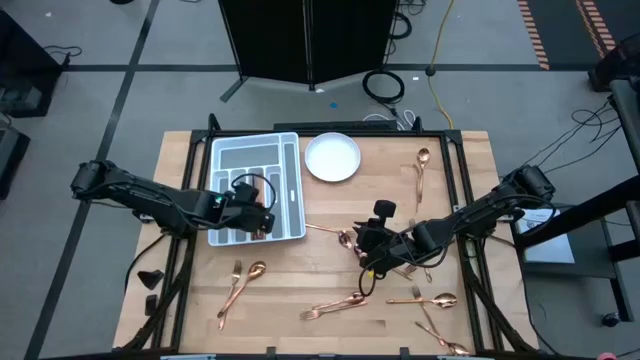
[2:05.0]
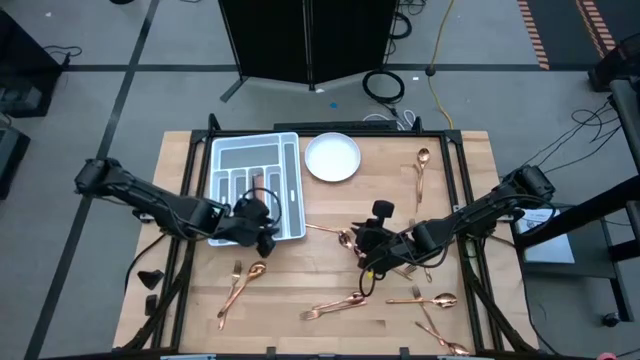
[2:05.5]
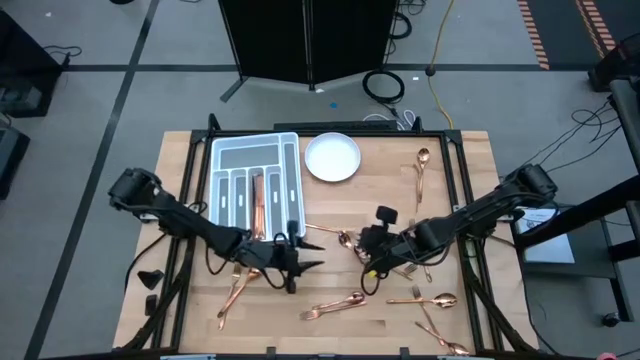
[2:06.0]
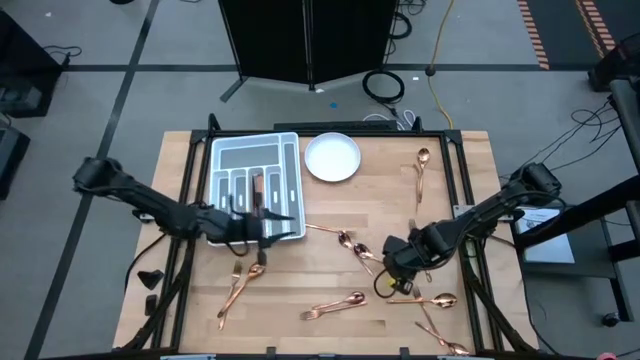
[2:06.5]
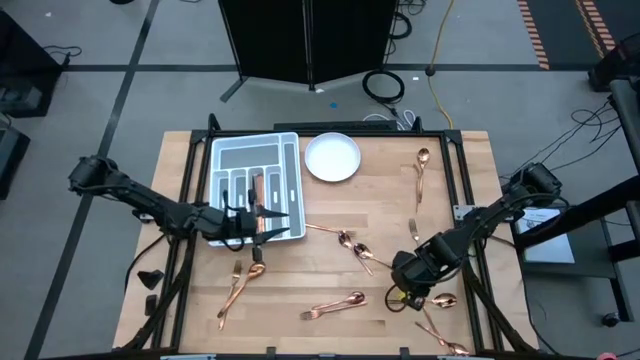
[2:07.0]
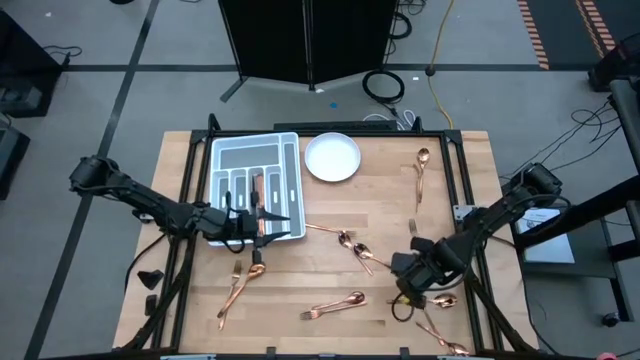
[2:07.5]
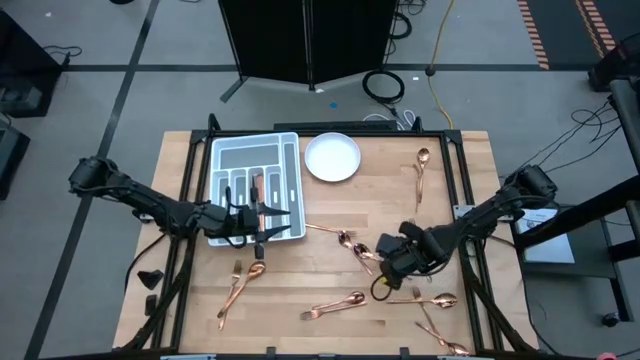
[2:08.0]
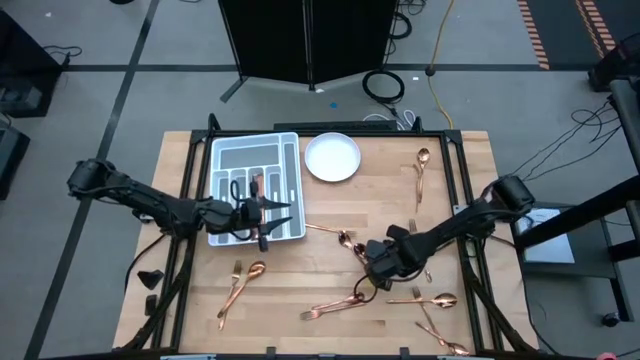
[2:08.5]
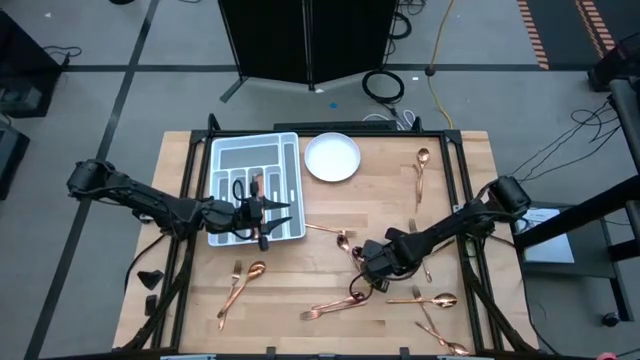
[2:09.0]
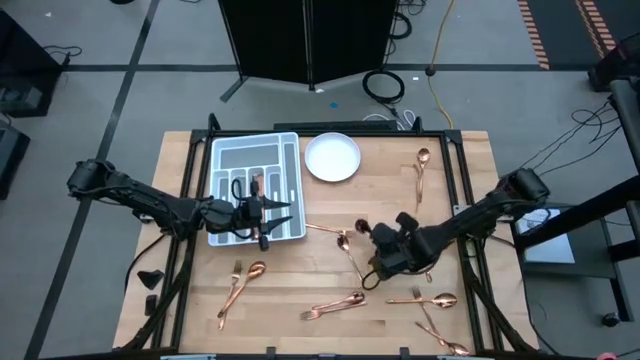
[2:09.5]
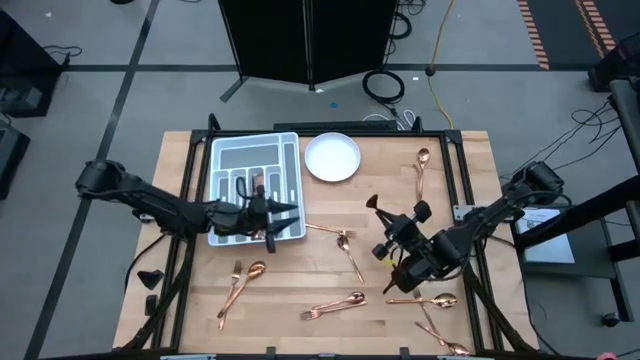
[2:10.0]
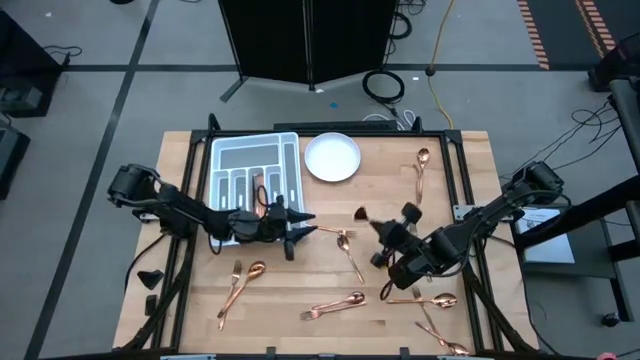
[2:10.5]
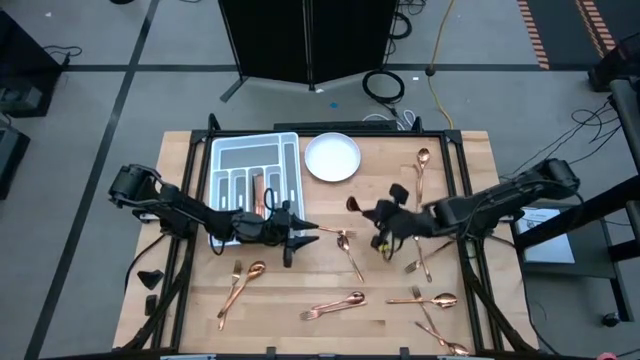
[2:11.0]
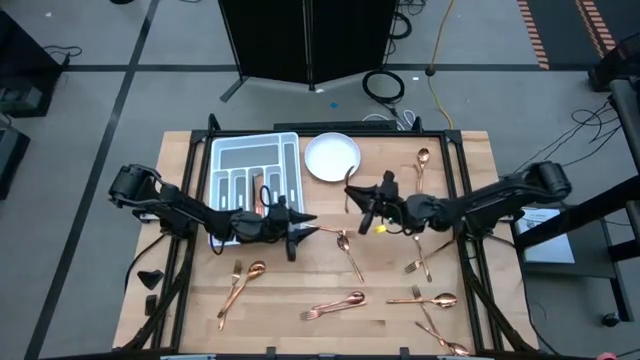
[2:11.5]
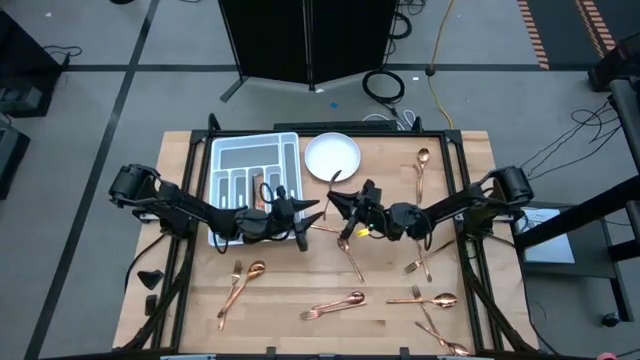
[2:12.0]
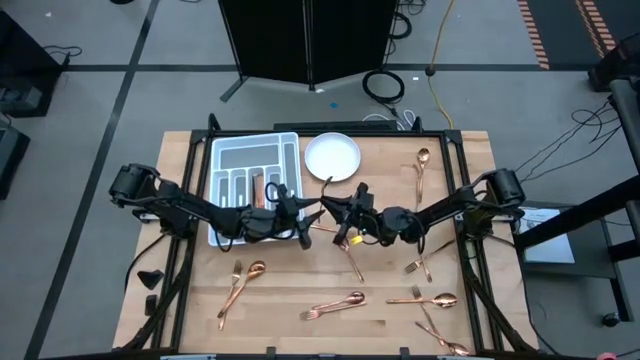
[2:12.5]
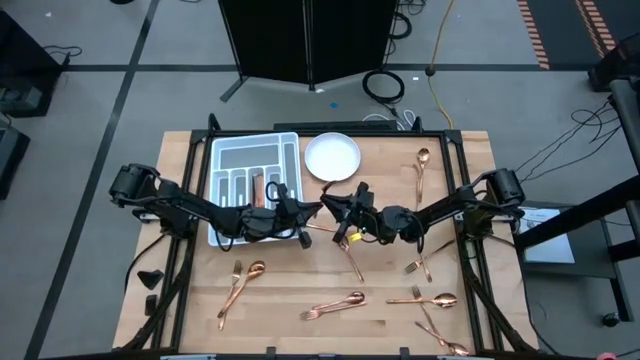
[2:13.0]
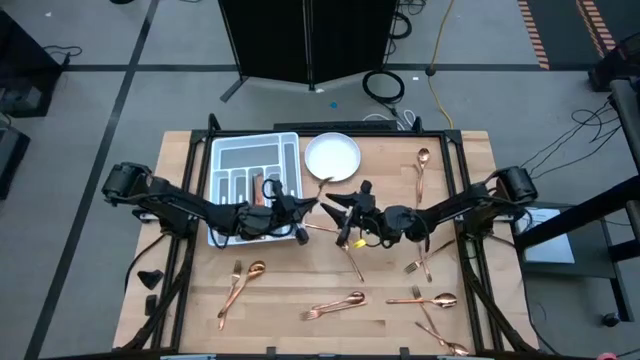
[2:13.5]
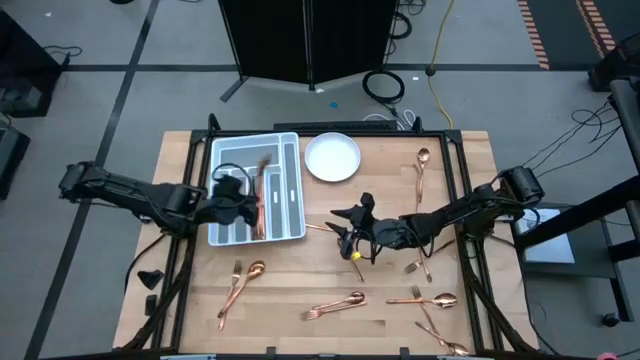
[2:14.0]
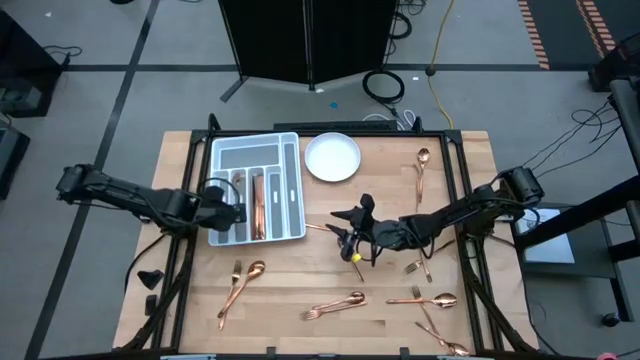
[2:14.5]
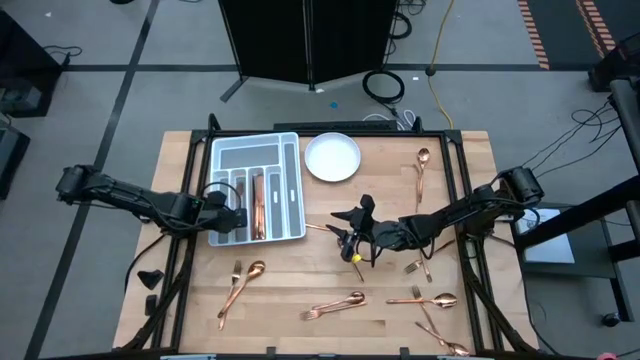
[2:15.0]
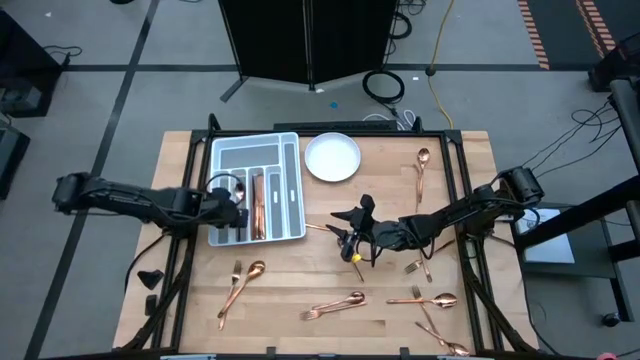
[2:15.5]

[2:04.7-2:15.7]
Task: Sort silverware
Put the spoon on the silverware tray

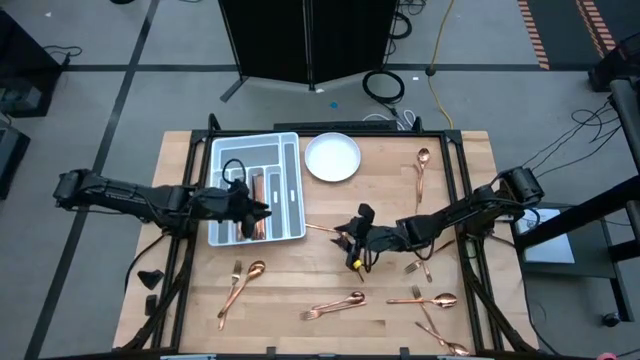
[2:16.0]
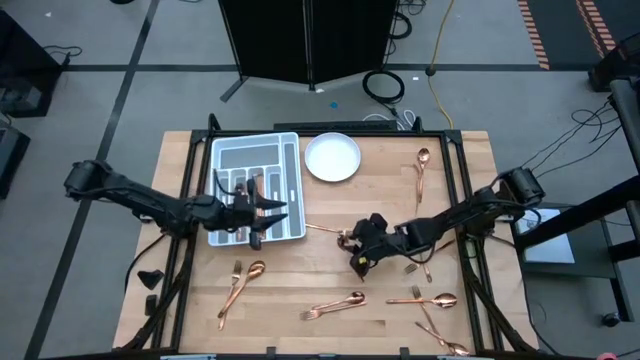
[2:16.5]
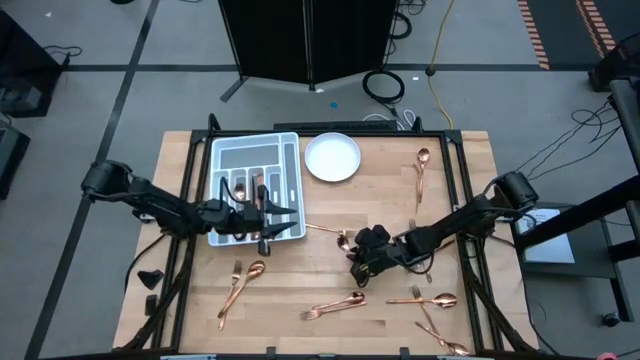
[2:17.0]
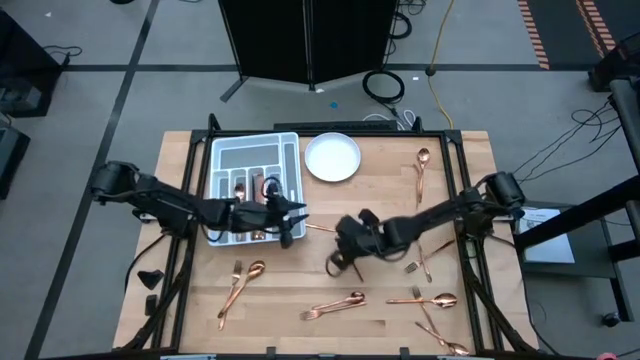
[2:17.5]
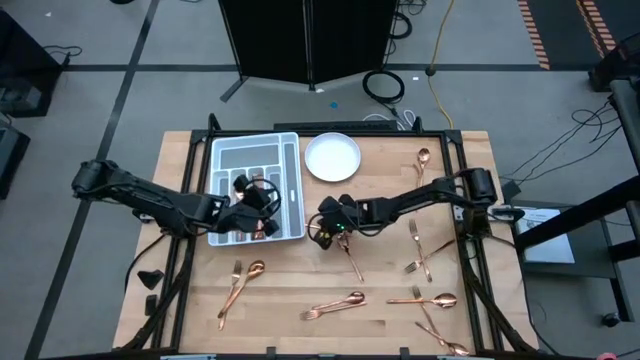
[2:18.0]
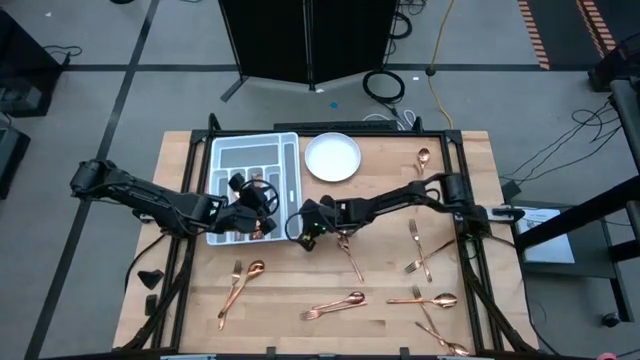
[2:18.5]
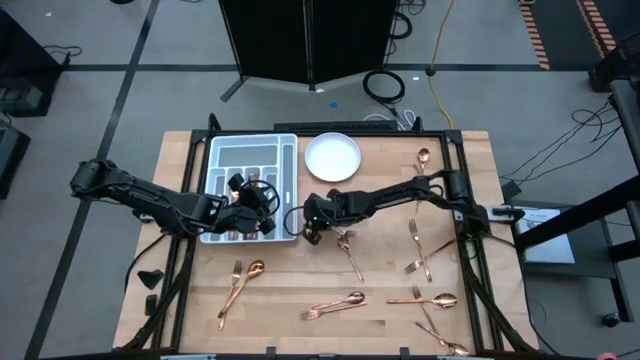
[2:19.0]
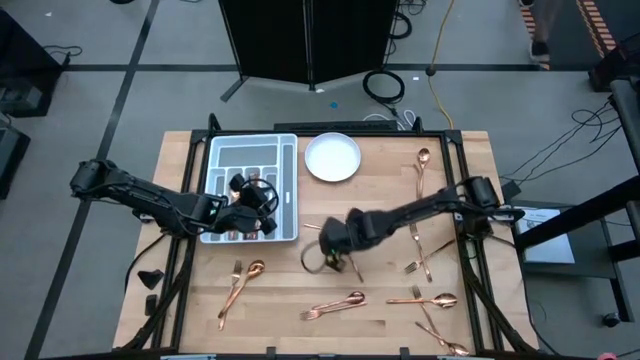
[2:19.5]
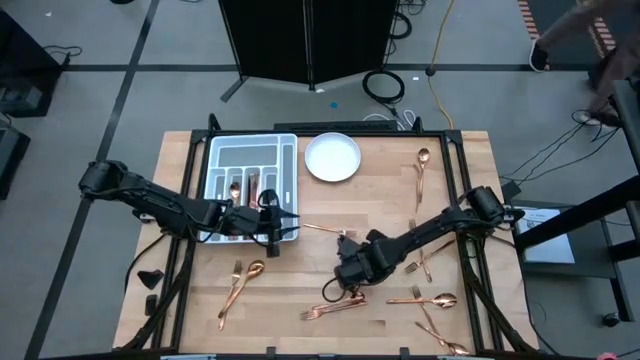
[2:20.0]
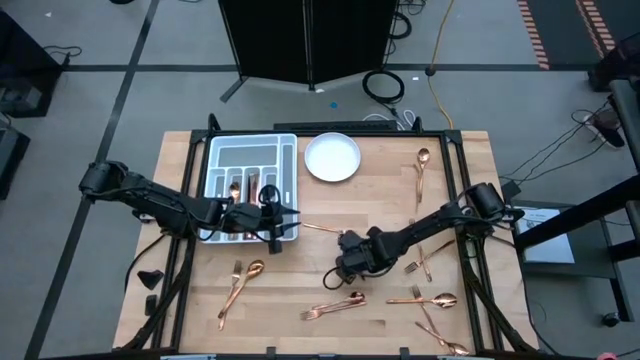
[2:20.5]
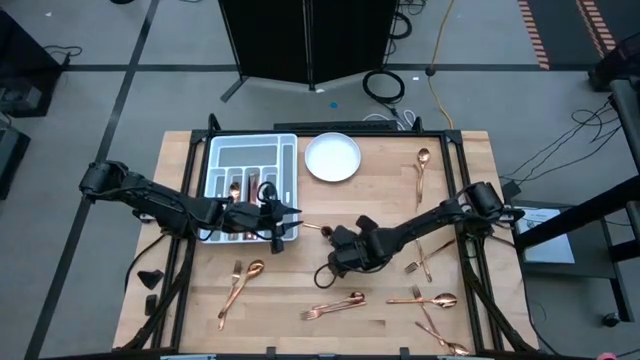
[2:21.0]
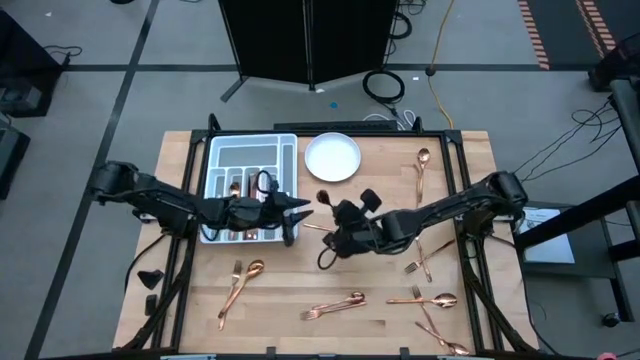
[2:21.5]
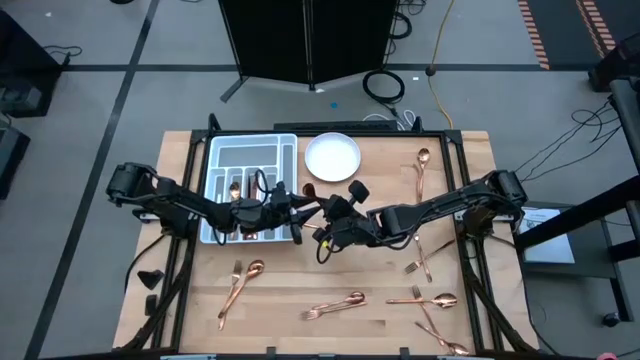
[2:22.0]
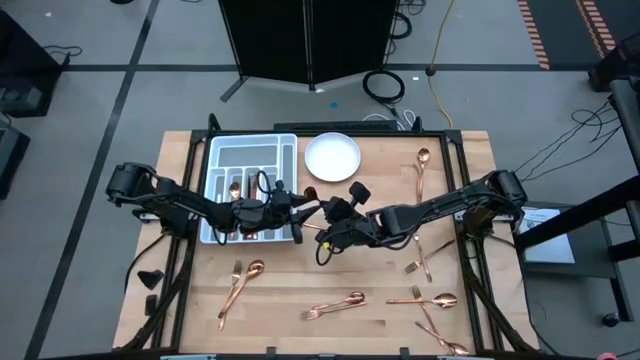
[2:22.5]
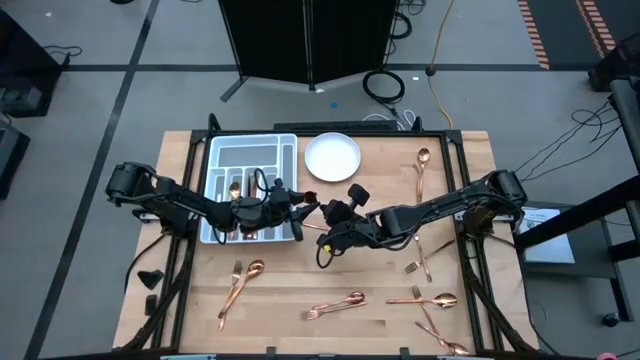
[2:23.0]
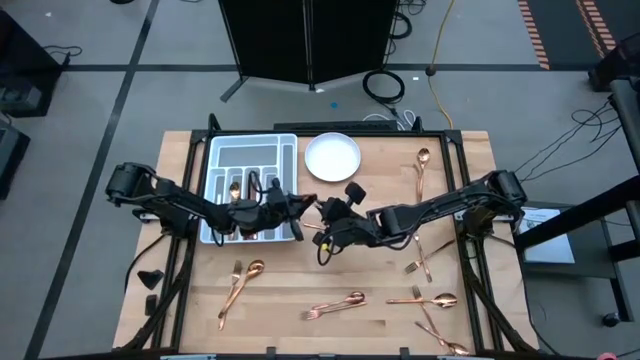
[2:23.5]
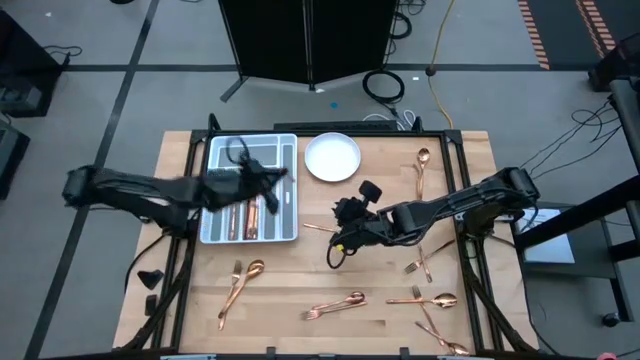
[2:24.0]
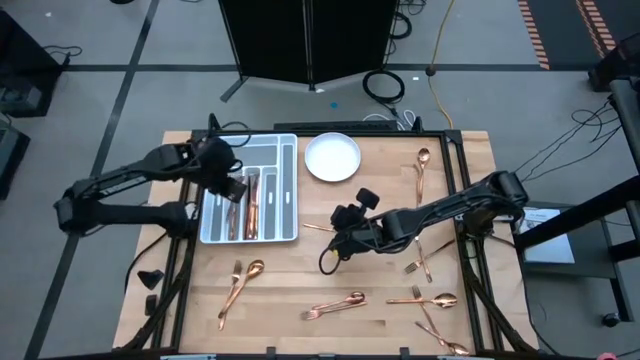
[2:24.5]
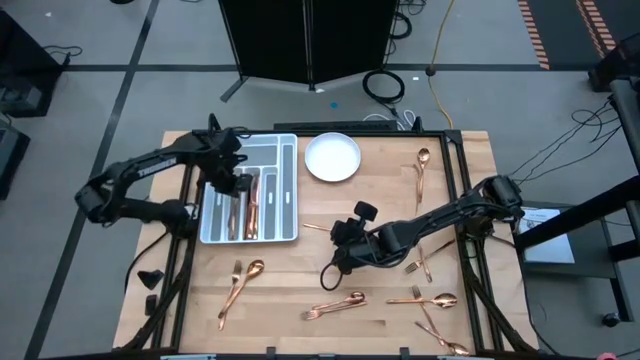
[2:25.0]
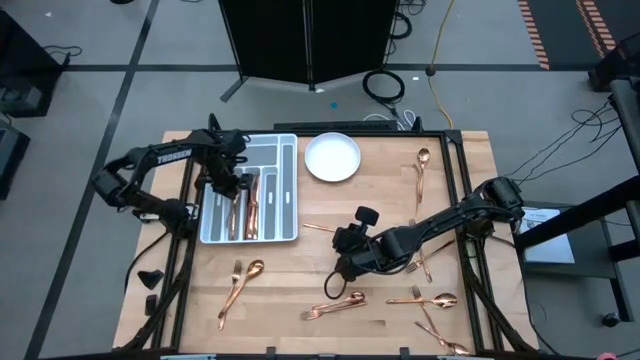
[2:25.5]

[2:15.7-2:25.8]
Put the spoon on the silverware tray

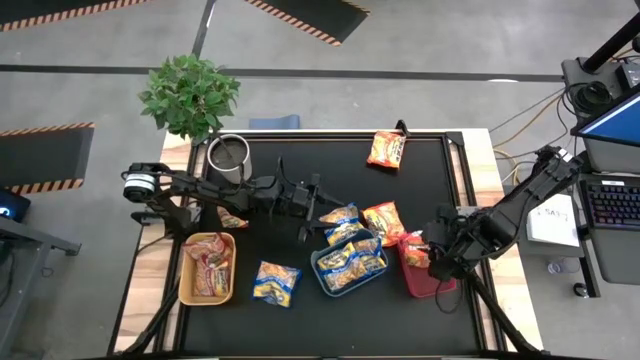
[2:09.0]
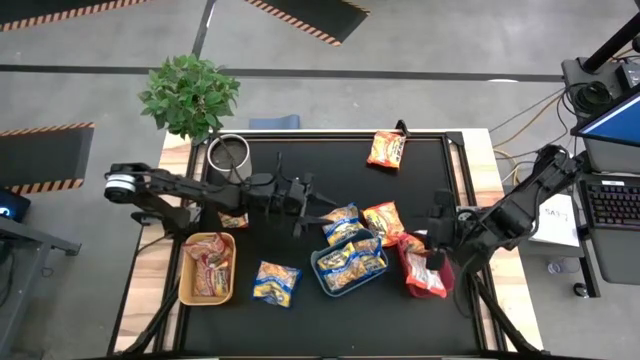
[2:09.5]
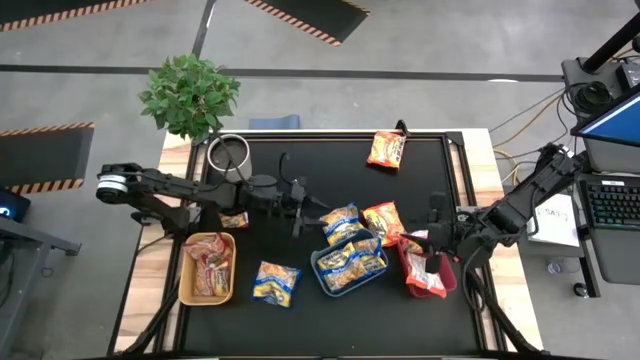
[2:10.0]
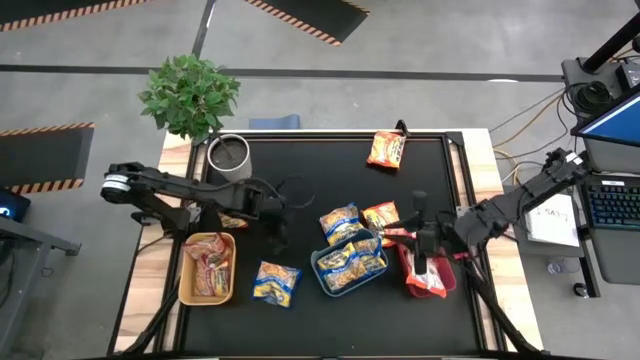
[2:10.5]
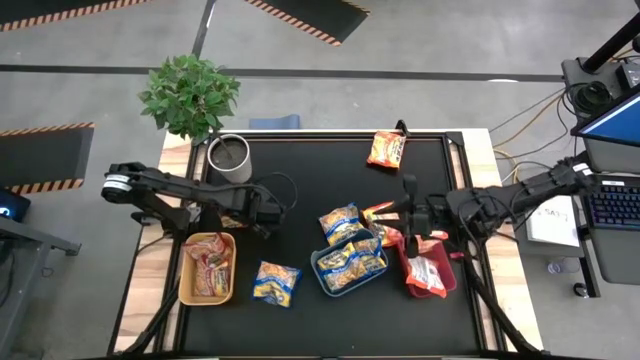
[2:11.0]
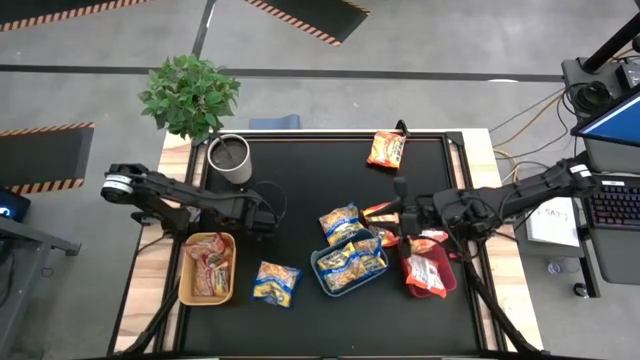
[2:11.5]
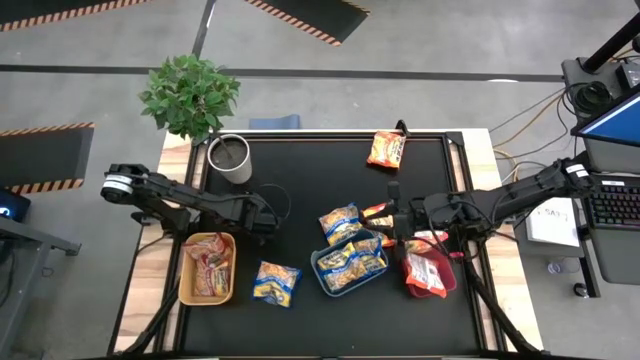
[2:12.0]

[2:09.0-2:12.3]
Task: Sort Maruchan noodles
Put the red noodle pack into the yellow bin
